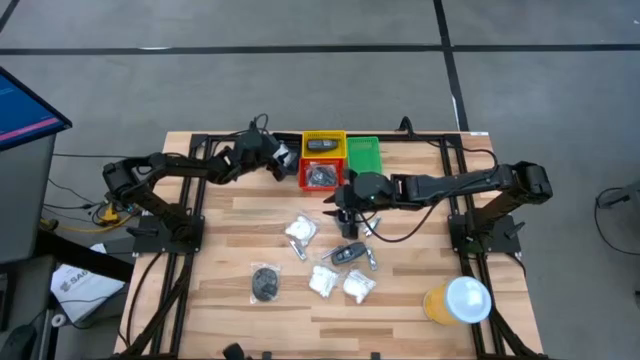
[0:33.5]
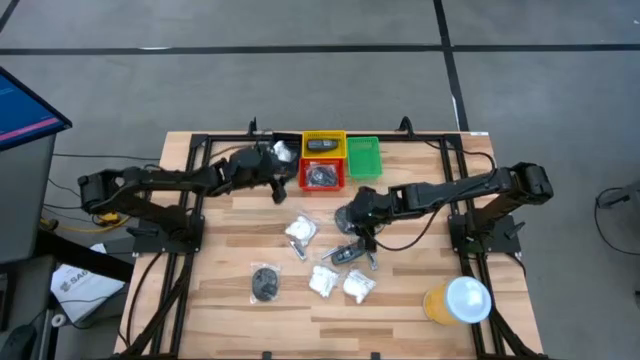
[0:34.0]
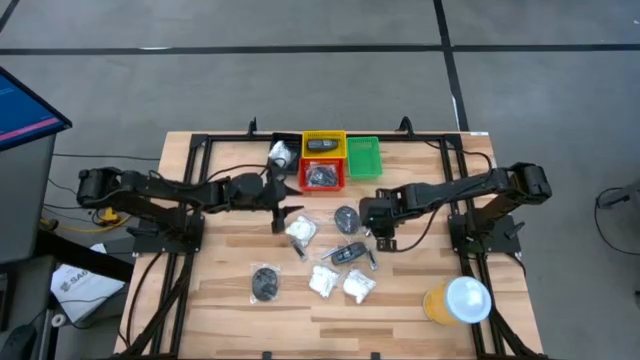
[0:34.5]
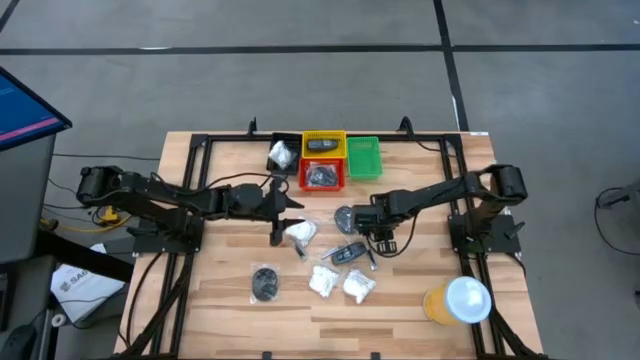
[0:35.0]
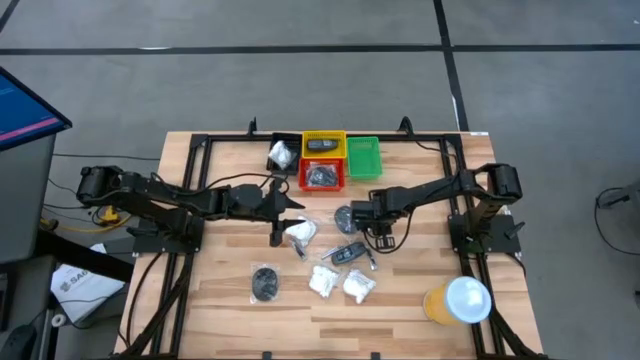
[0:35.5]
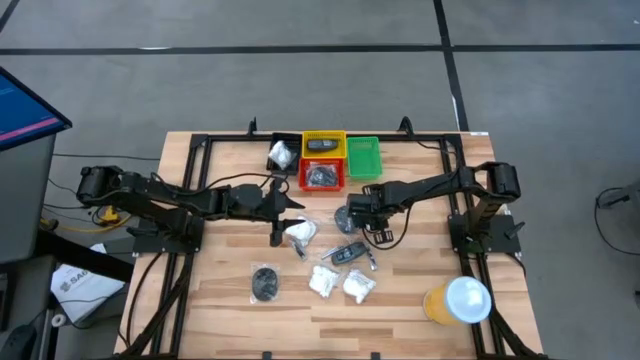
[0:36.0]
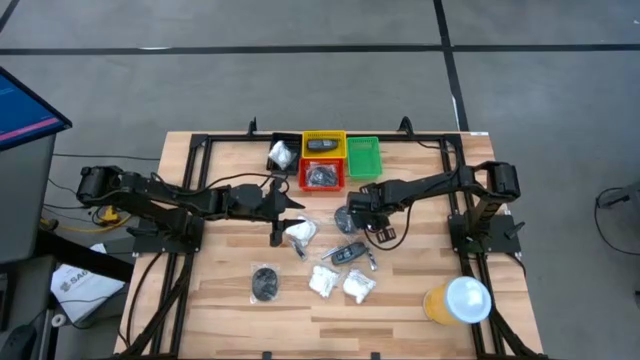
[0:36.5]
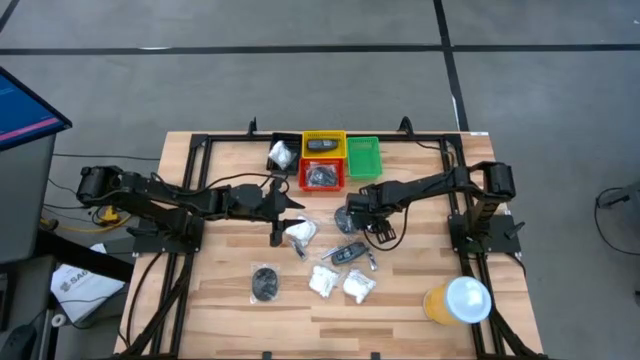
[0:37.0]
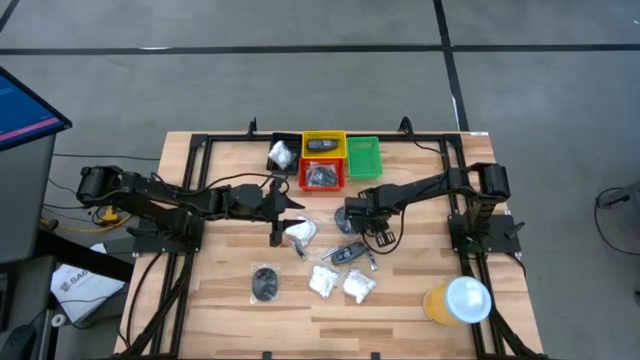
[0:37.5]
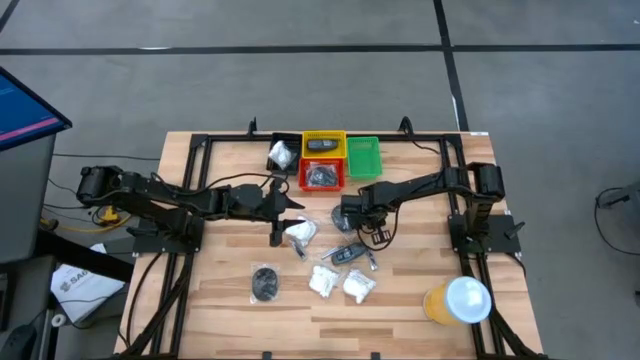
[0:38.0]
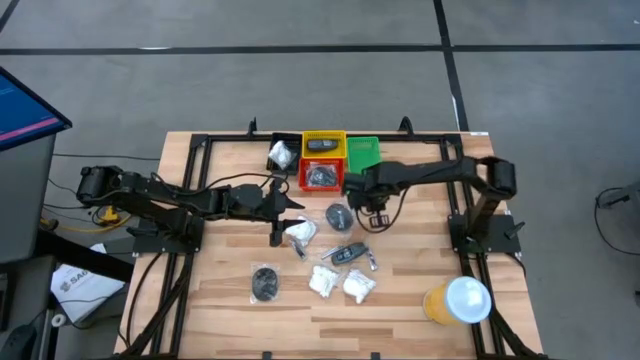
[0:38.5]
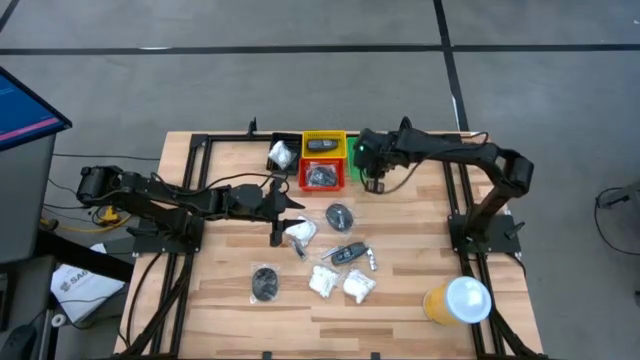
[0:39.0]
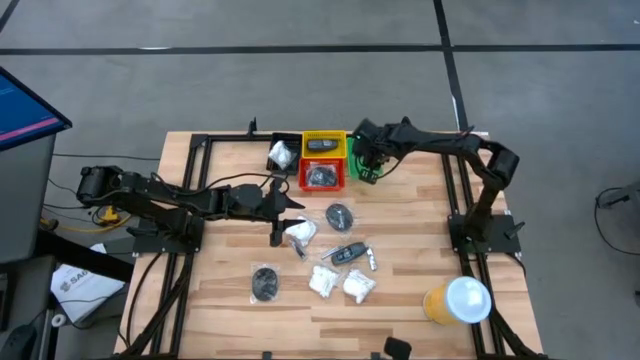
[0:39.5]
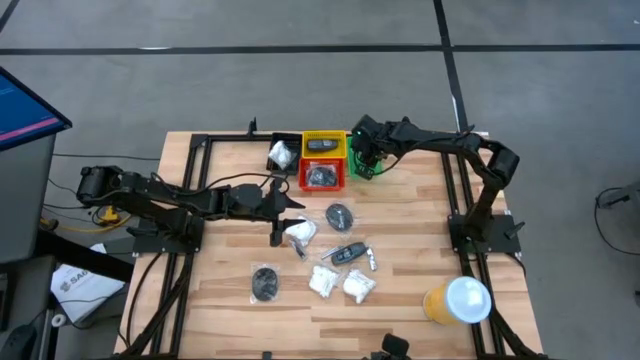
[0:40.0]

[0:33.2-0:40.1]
Task: Pick & Place Travel size toiletries
Put the silver nail cutter into the green bin

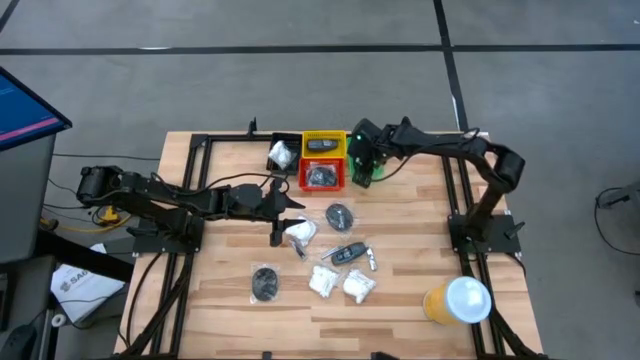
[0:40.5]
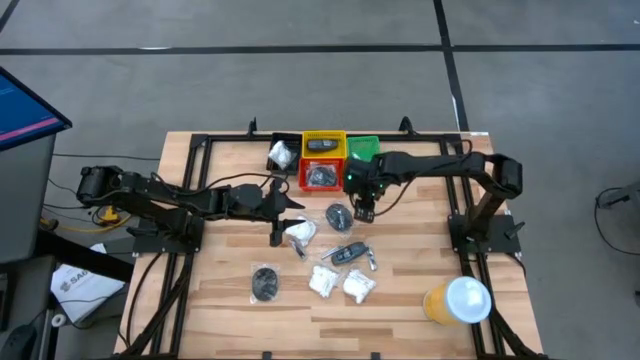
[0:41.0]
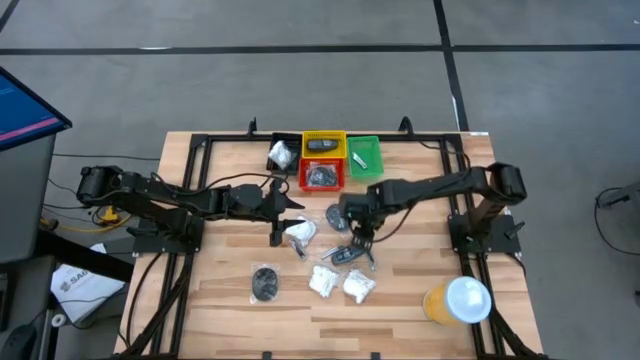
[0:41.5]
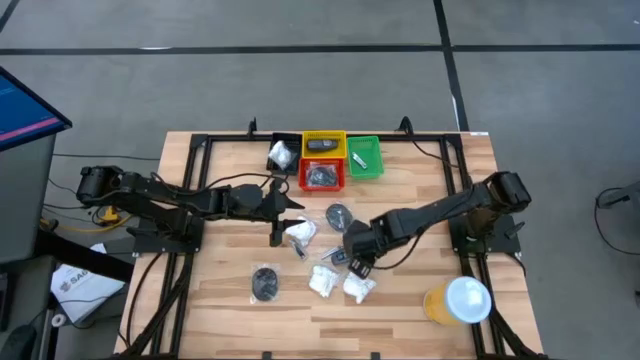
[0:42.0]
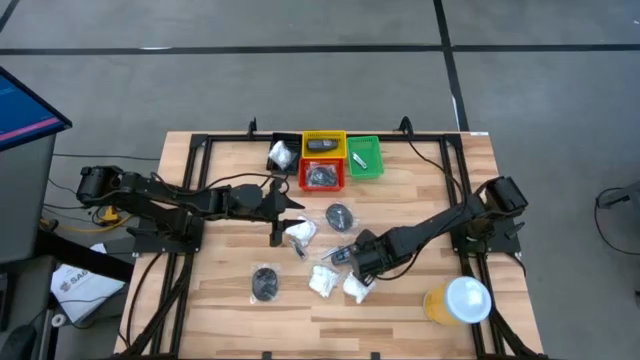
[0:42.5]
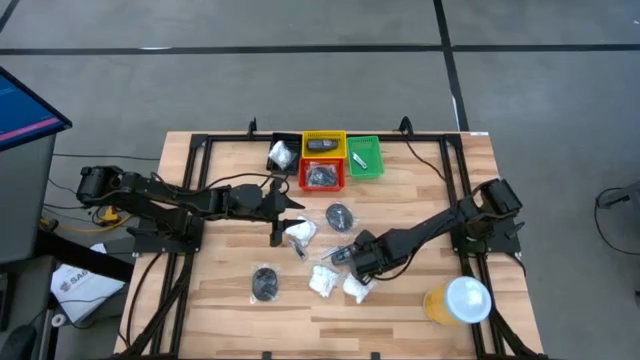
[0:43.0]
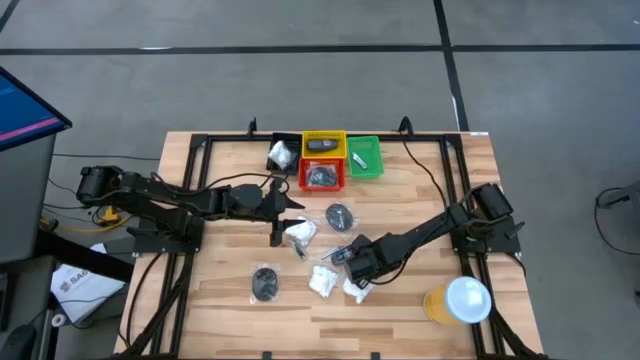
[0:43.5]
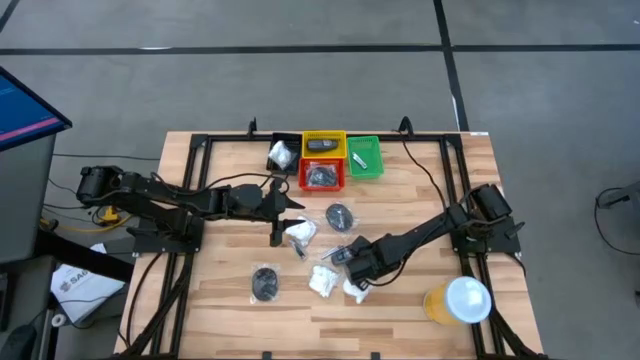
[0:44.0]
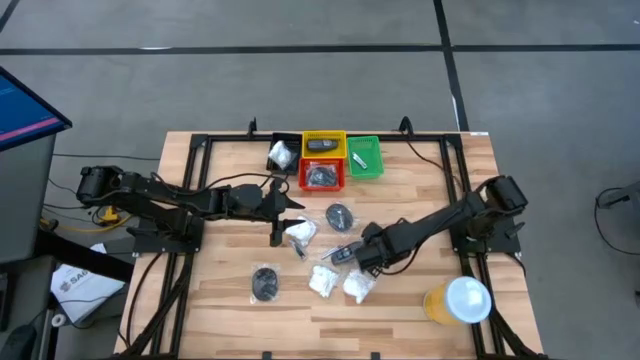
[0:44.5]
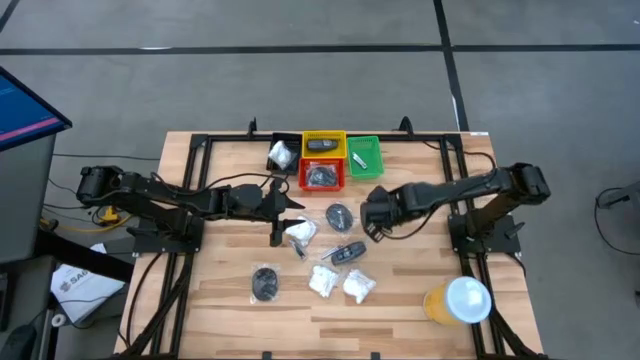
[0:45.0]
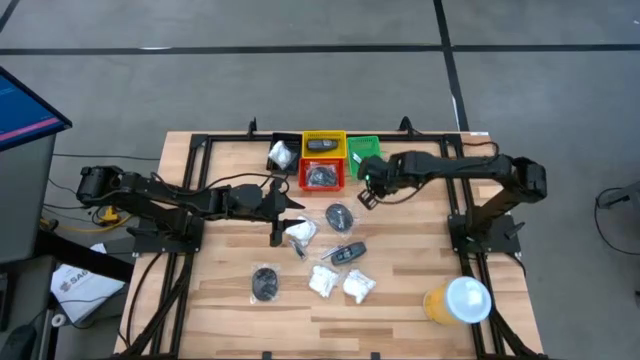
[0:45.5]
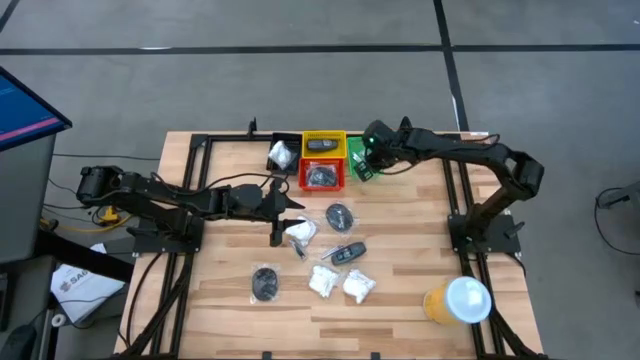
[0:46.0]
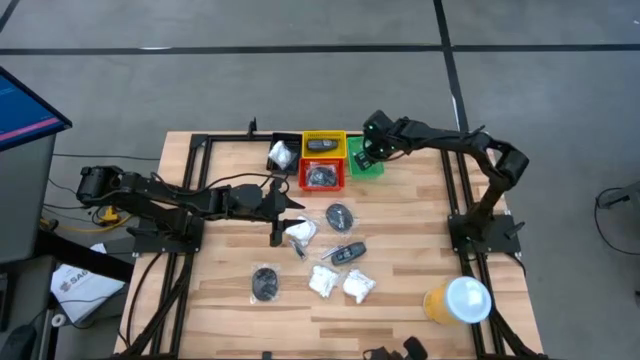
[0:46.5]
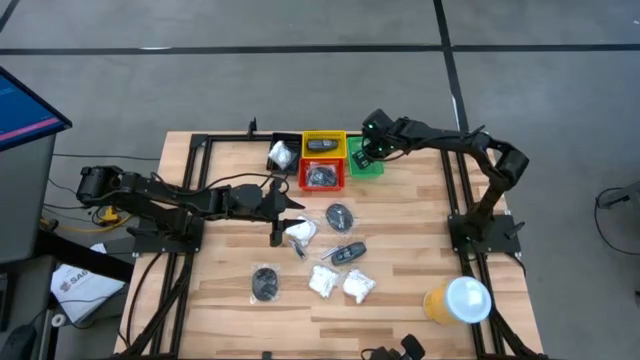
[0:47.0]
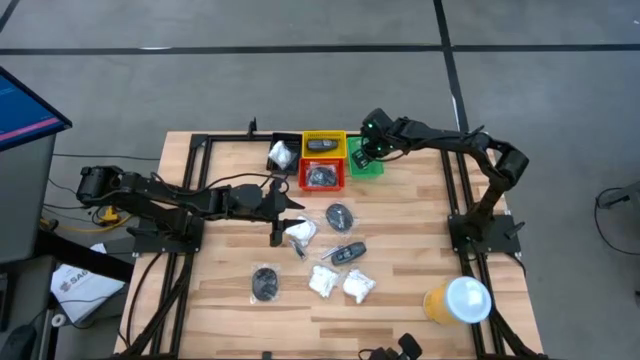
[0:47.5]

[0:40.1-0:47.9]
Put the silver nail cutter into the green bin

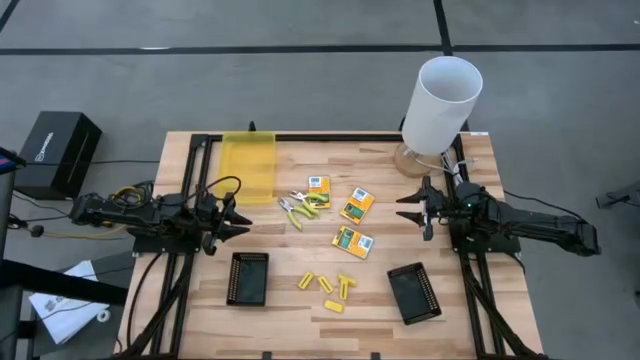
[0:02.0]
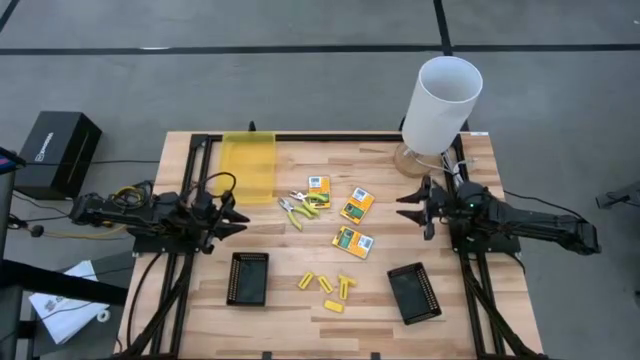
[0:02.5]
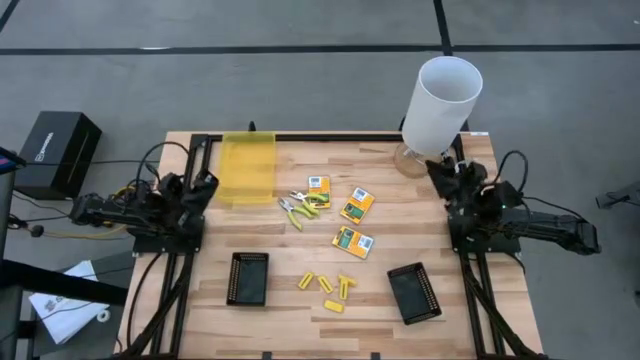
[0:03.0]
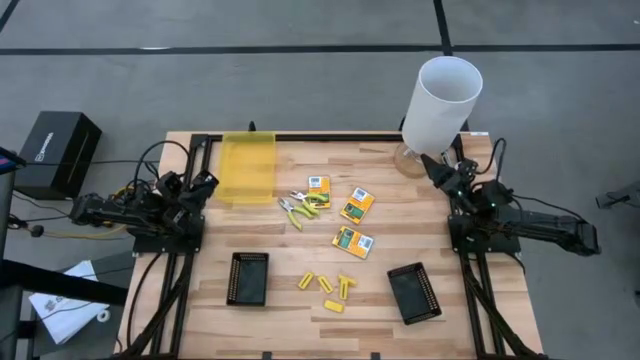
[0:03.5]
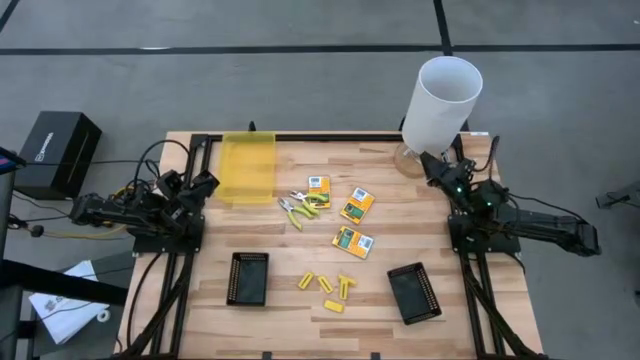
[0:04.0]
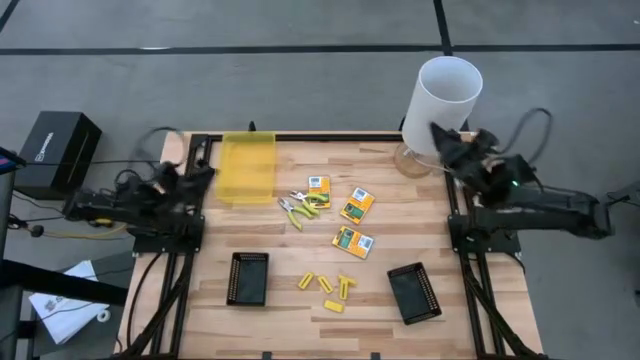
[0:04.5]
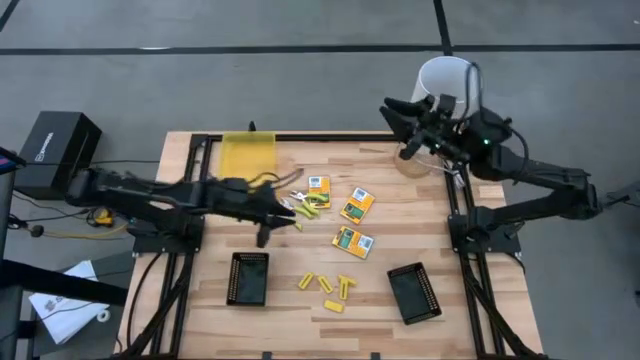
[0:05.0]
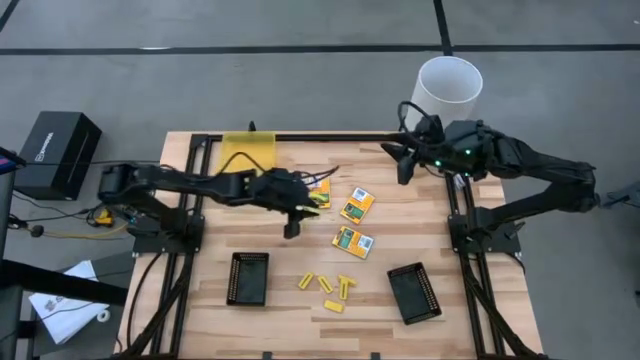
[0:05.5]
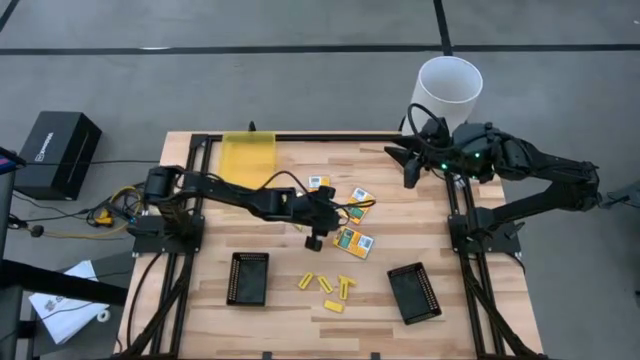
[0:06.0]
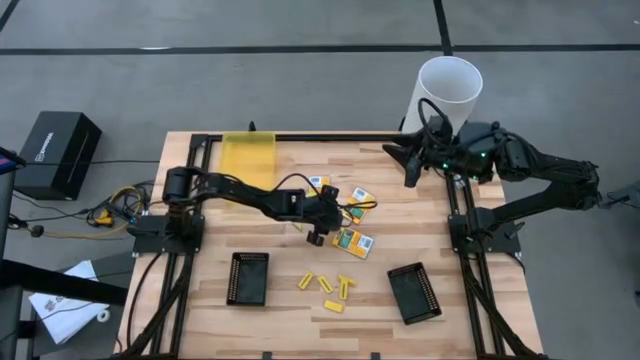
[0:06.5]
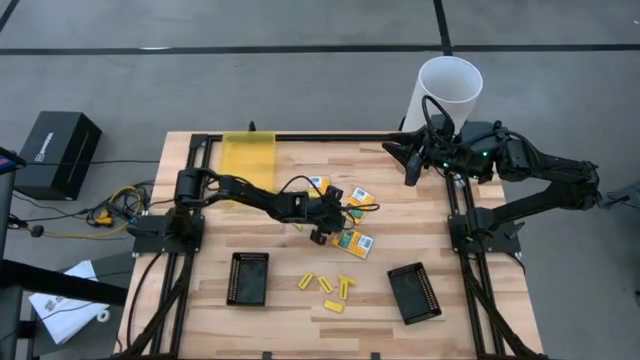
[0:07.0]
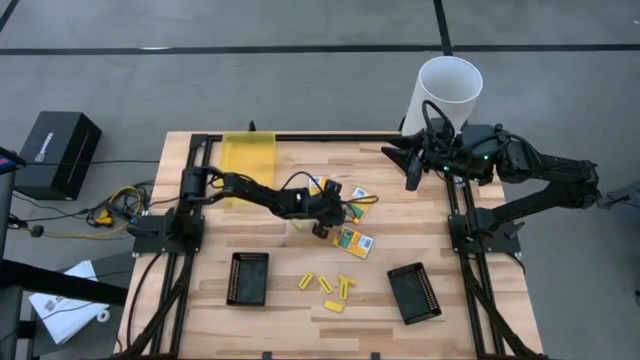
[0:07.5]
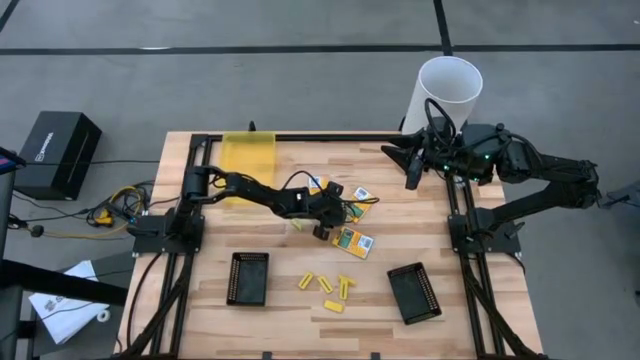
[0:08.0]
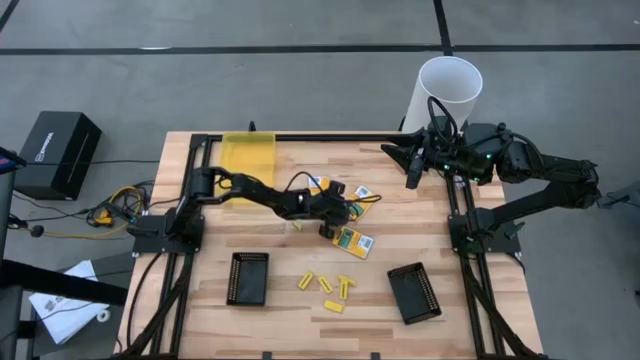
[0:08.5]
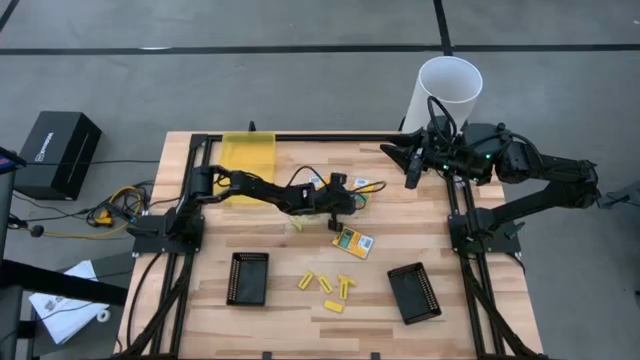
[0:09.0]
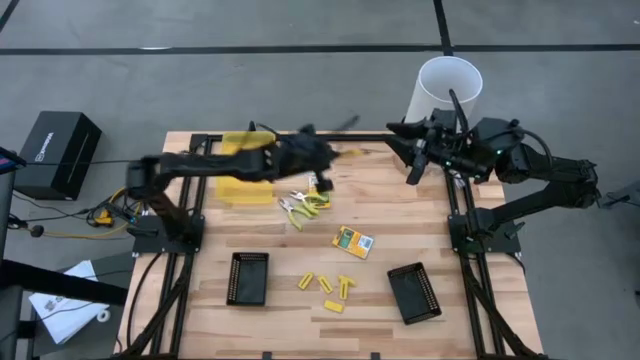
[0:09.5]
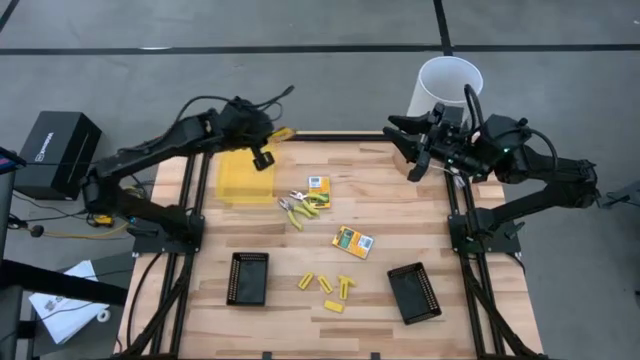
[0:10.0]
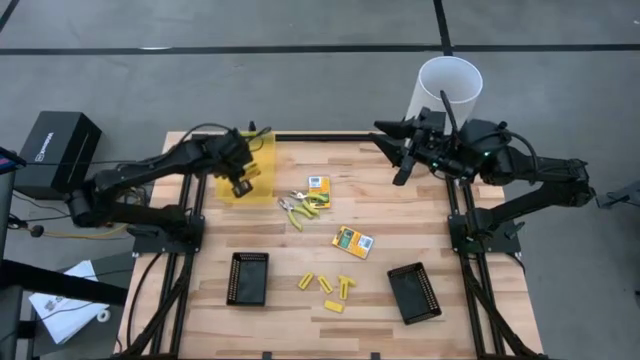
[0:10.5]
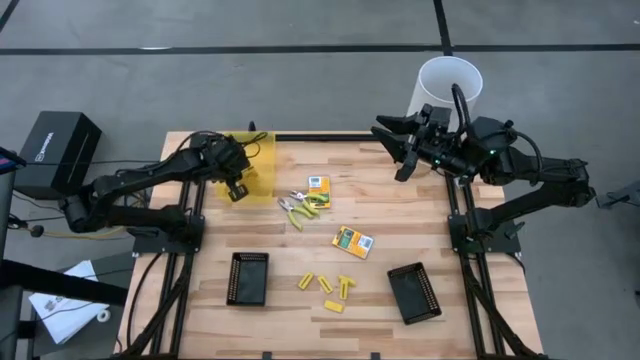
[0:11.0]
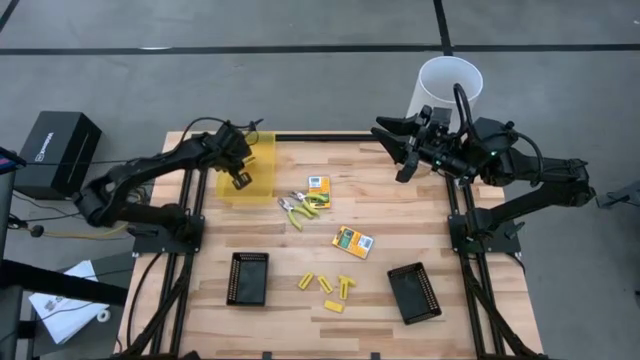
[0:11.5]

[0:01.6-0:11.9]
Task: Pick & Place School Supplies
Put the yellow crayon box into the yellow bin
